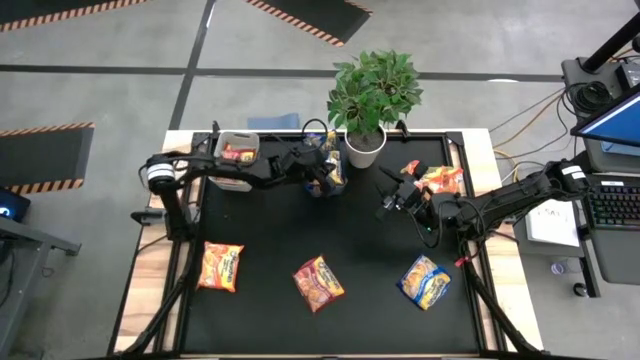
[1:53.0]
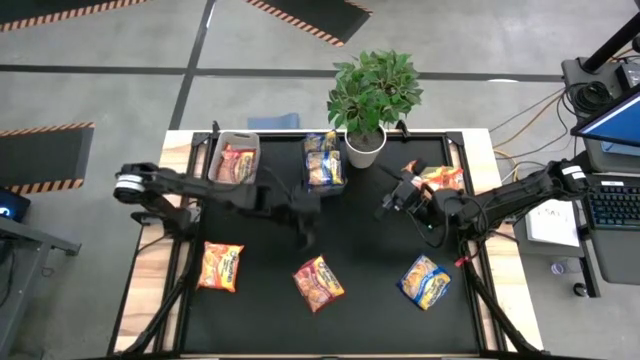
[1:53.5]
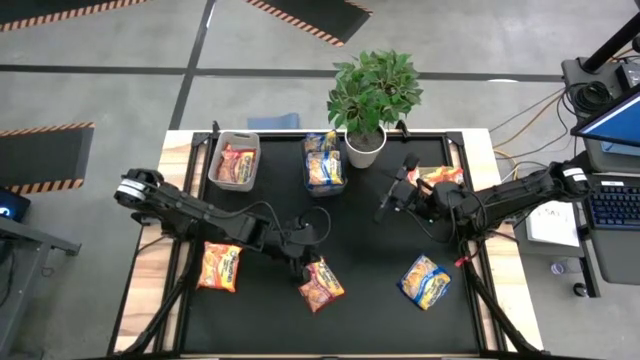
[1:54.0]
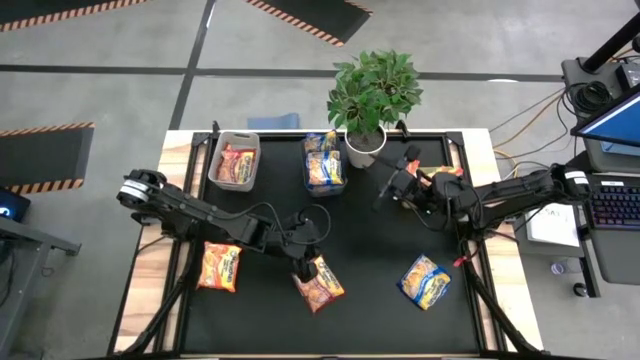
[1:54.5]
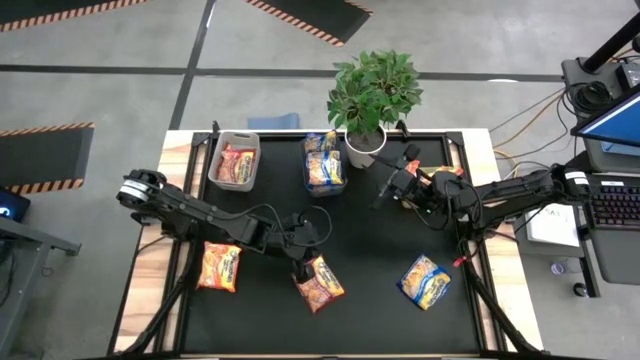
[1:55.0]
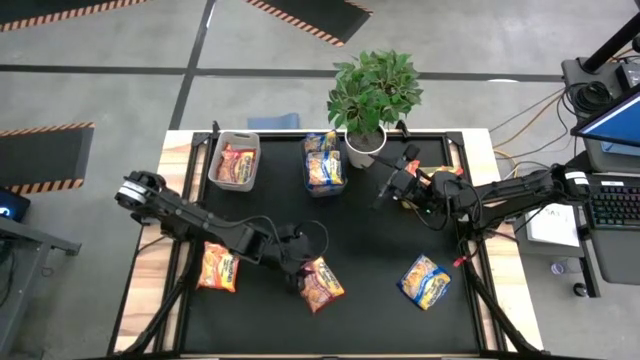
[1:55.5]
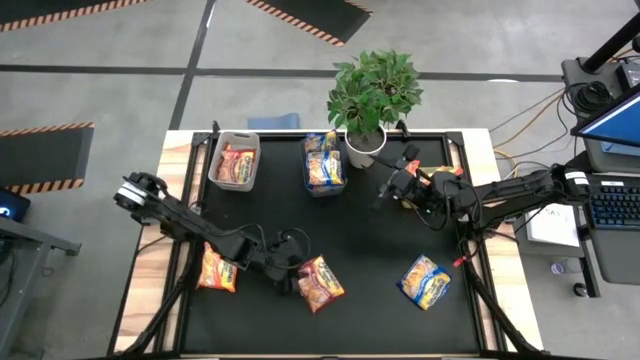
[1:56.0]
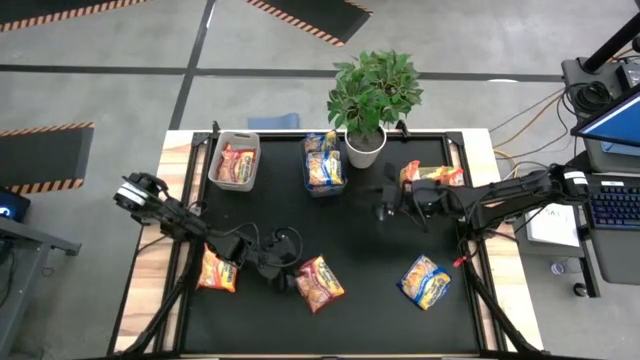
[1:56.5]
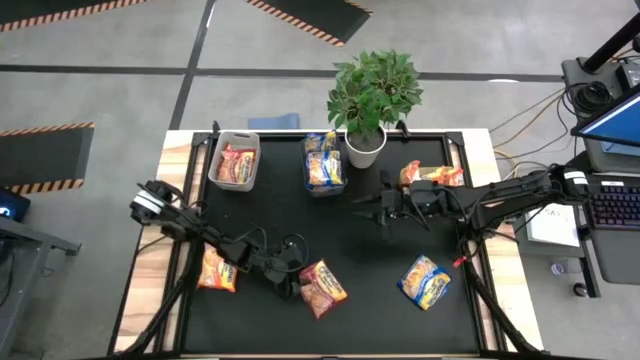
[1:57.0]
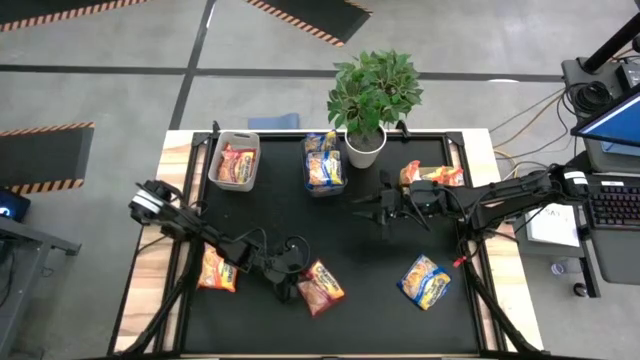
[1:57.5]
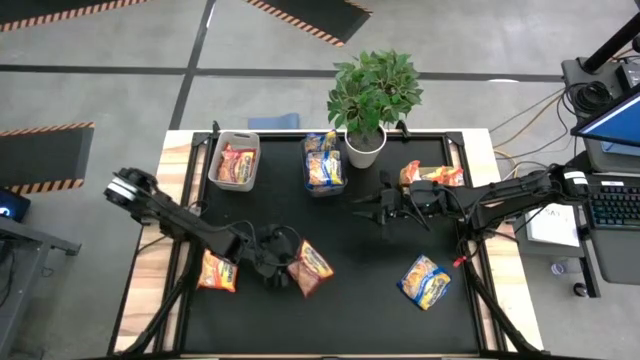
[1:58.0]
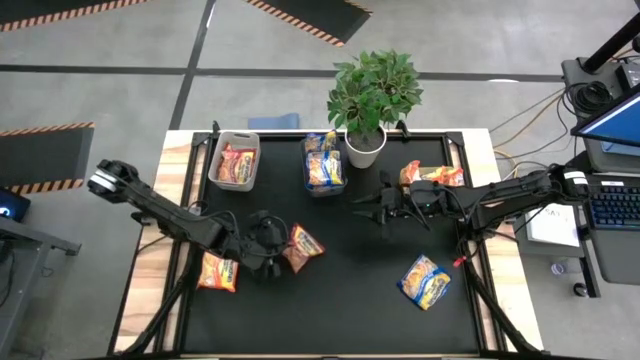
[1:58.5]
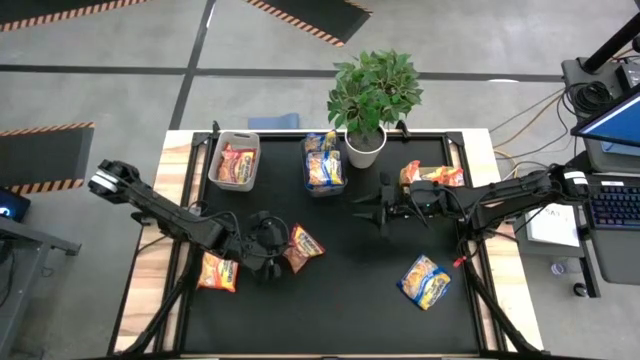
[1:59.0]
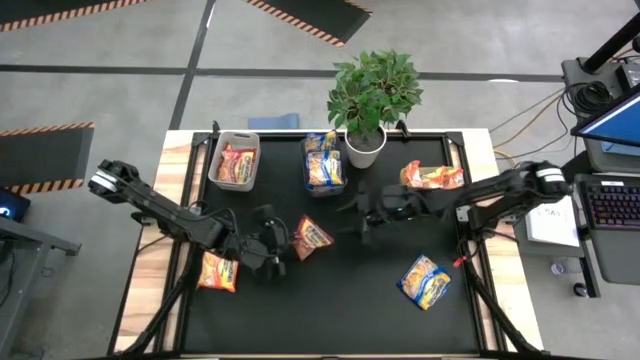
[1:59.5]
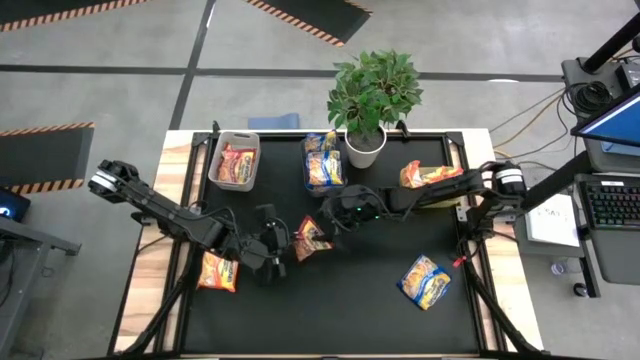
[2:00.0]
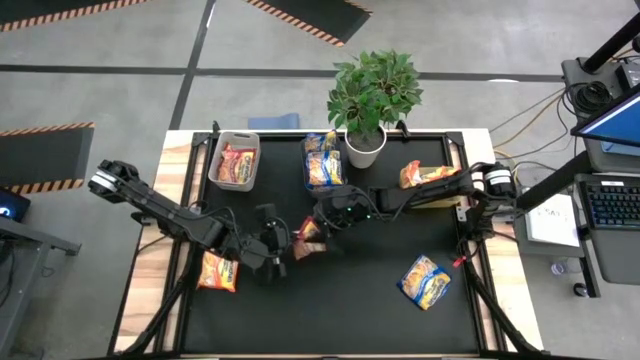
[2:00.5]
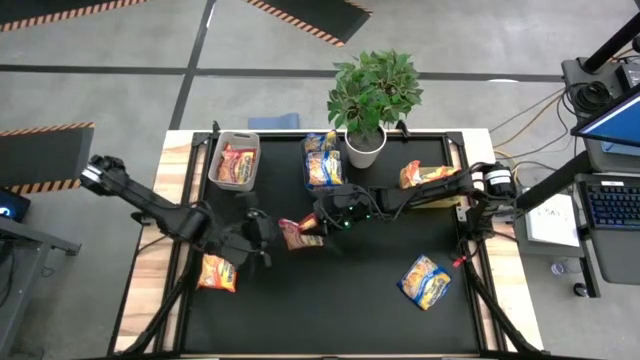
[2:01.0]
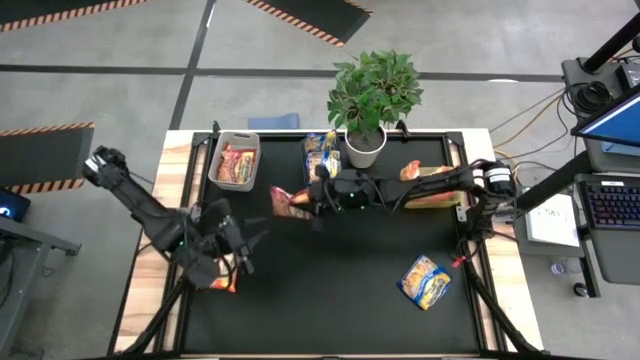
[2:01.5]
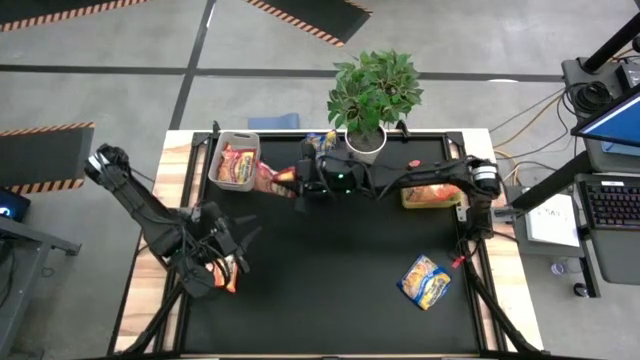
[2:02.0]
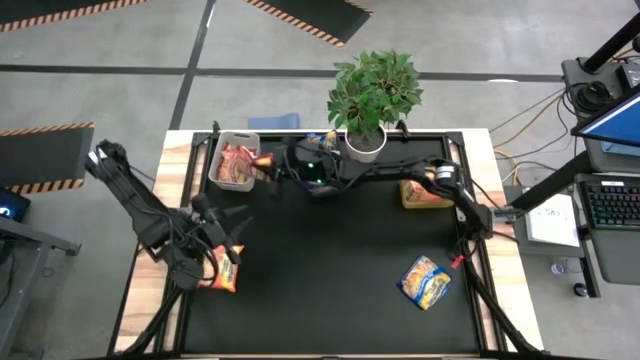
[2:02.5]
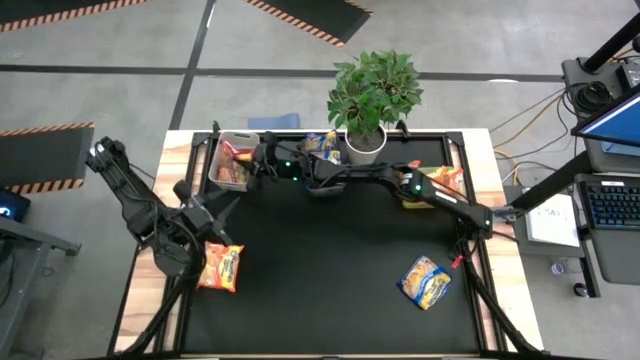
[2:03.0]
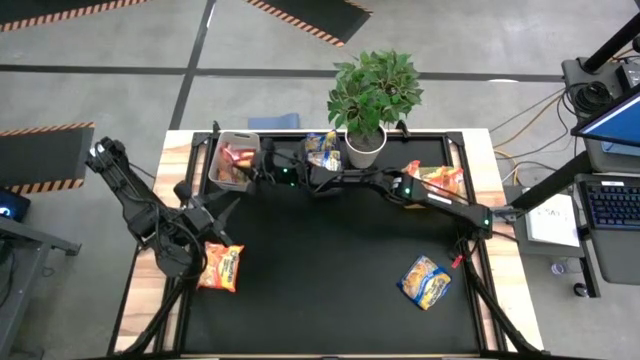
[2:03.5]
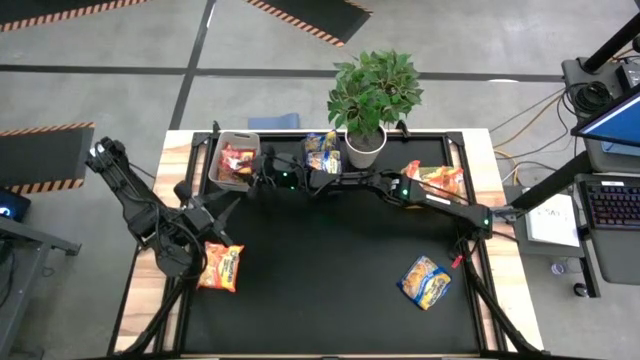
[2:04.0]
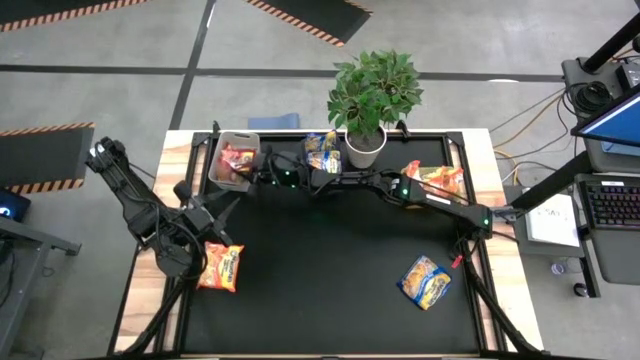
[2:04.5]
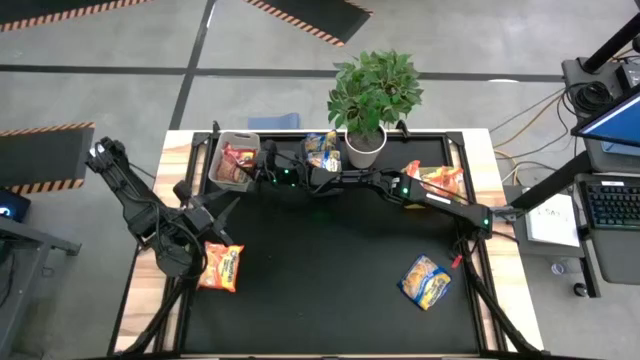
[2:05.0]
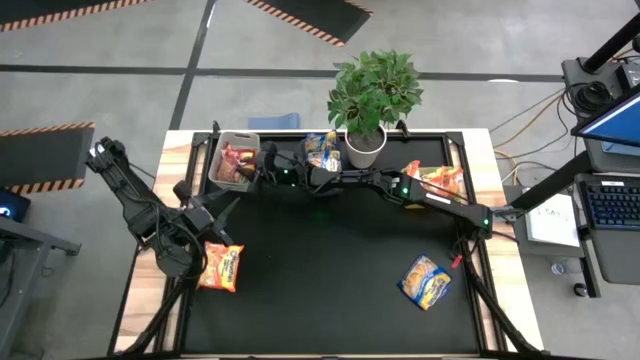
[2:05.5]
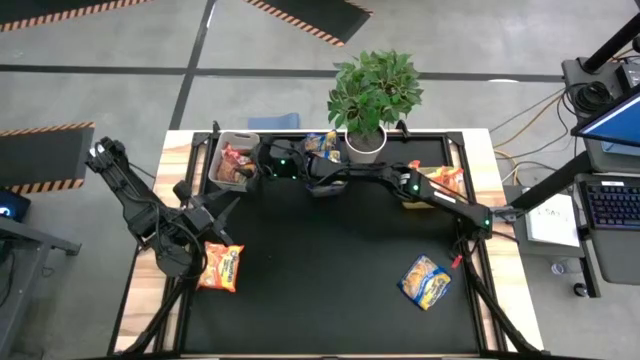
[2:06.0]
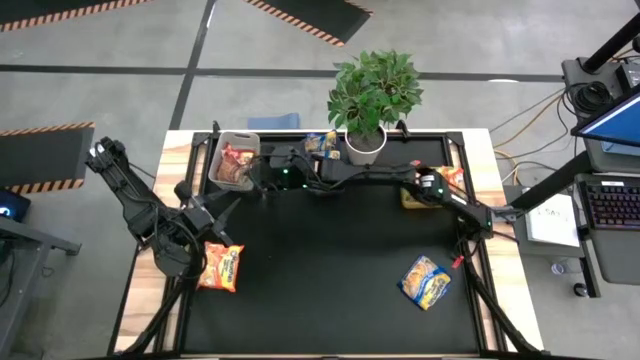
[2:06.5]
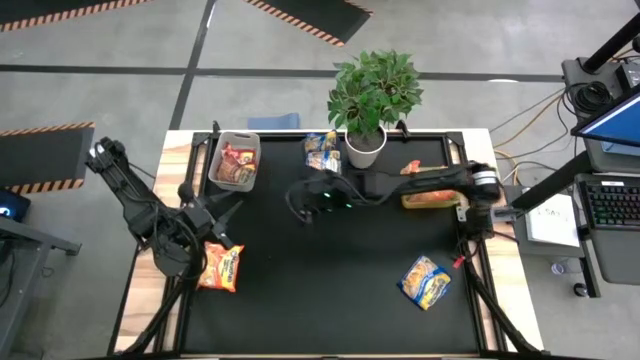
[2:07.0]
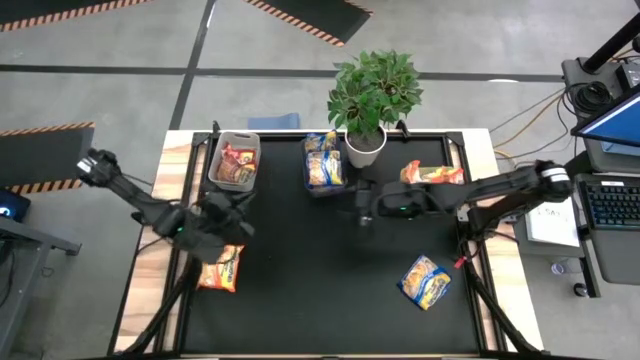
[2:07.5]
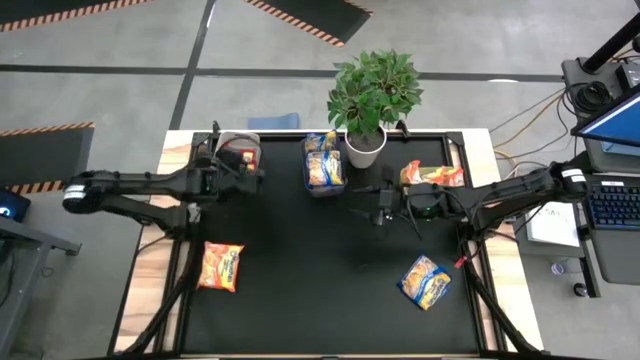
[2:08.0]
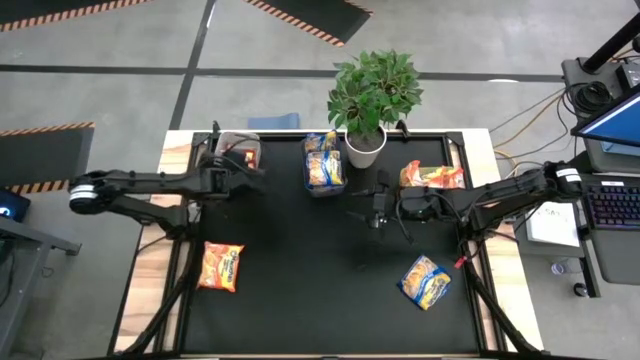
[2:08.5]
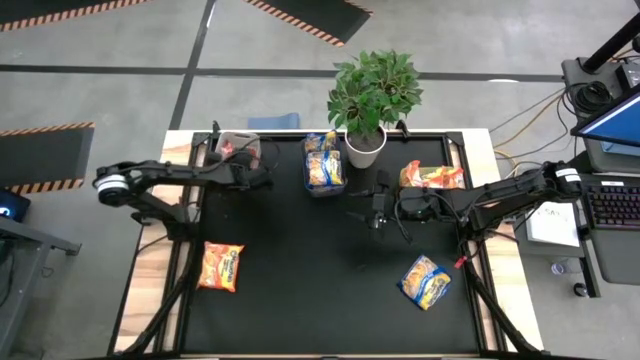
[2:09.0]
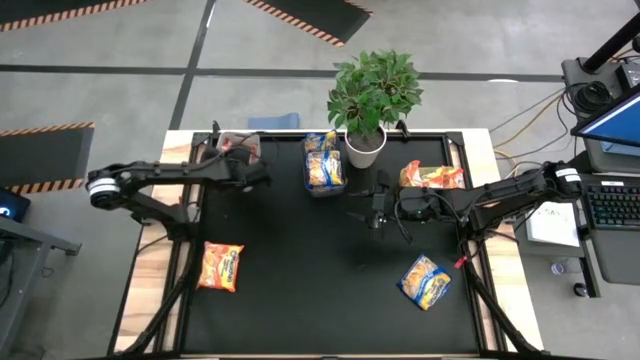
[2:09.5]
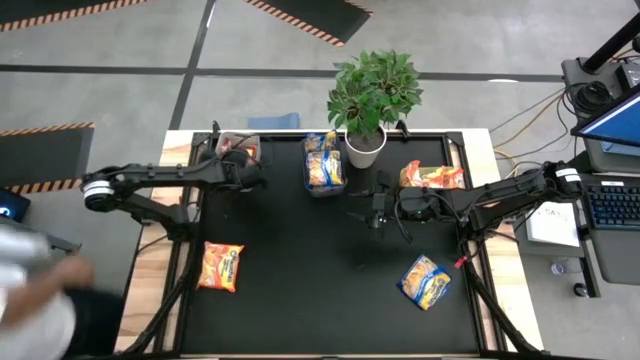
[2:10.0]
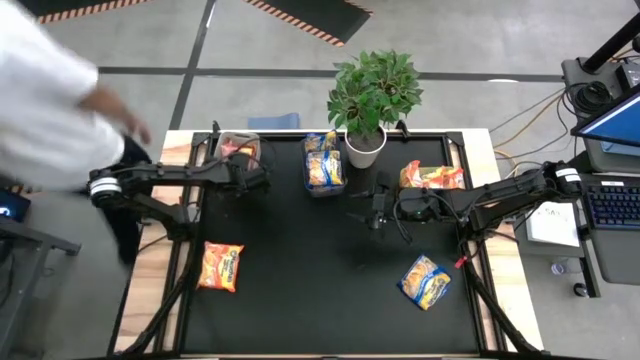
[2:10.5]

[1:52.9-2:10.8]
Task: Sort Maruchan noodles
Put the red noodle pack into the white bin

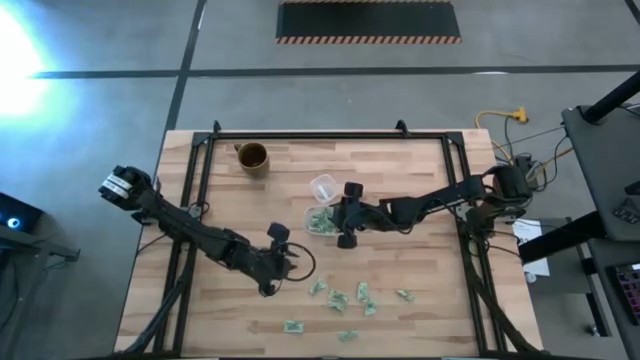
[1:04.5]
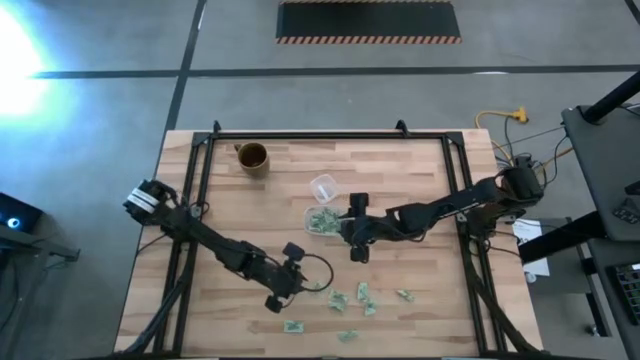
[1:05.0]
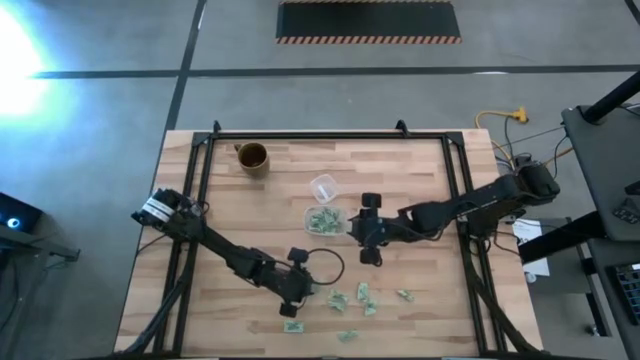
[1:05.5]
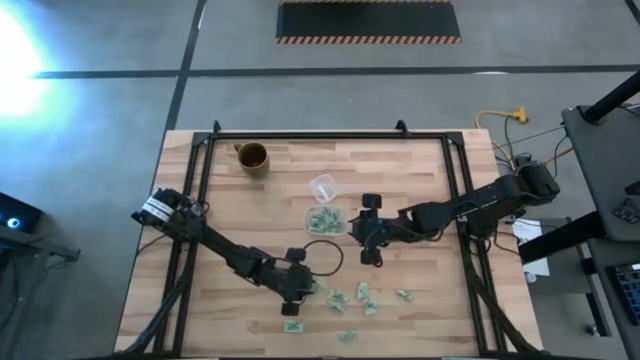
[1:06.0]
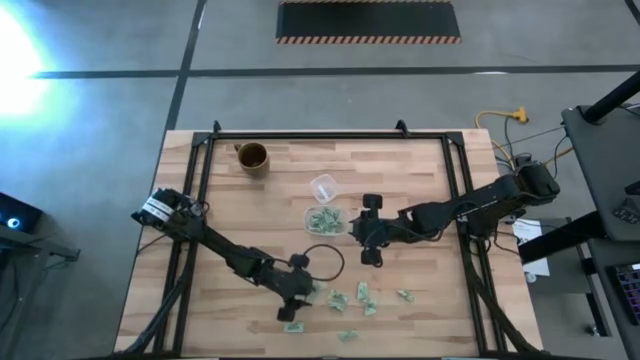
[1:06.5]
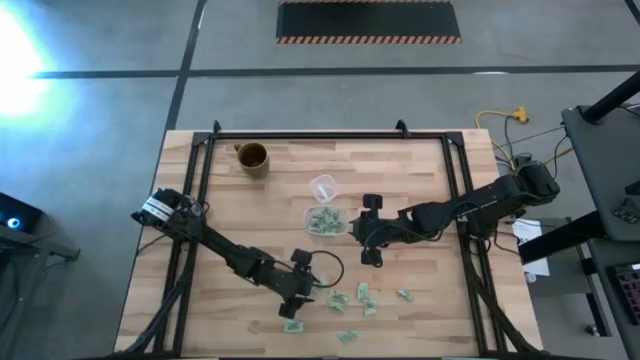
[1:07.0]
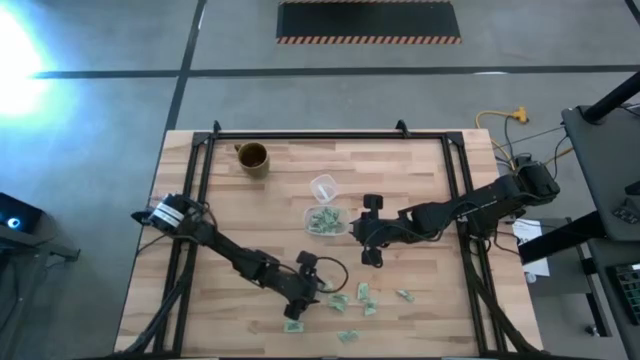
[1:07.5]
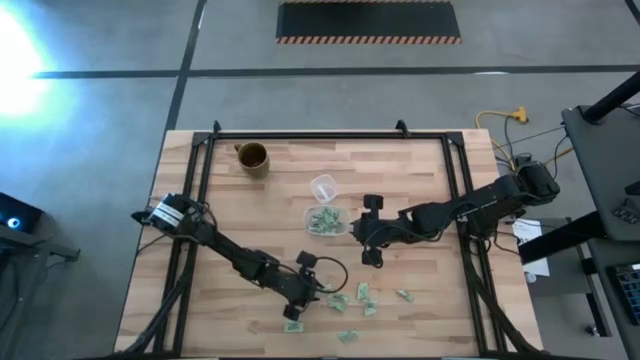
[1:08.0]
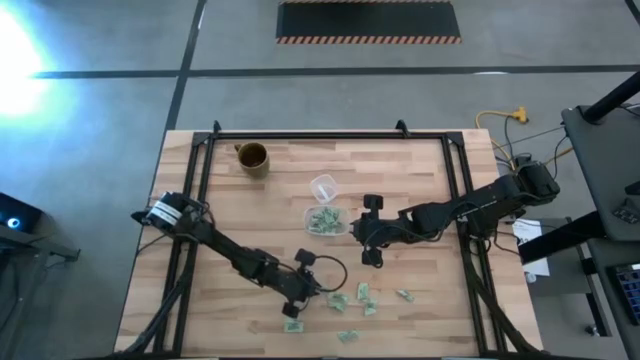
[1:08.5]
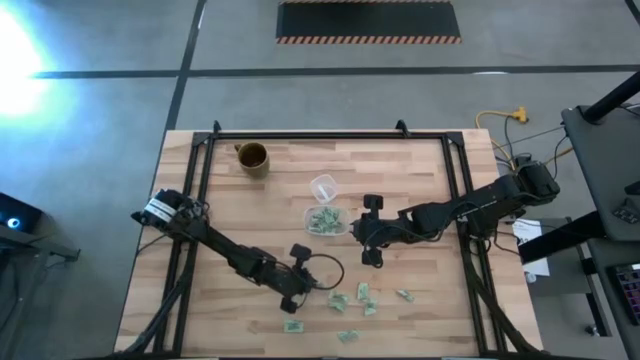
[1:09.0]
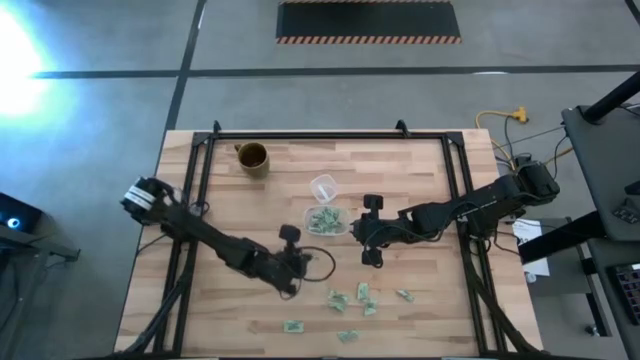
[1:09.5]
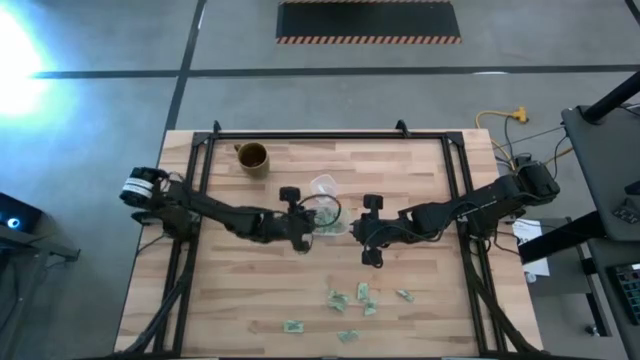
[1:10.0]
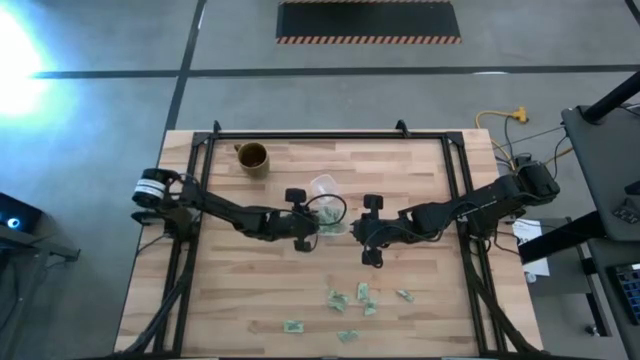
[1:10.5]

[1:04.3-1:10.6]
Task: Pick and place Stevia / Truvia into bins
Put the stevia packet into the bottom transparent container
